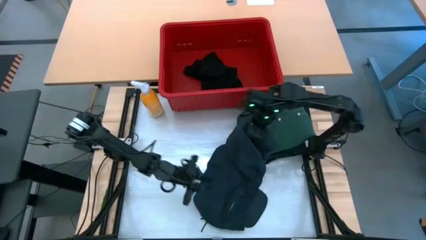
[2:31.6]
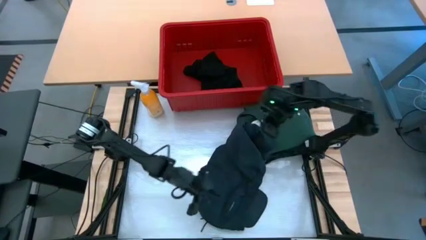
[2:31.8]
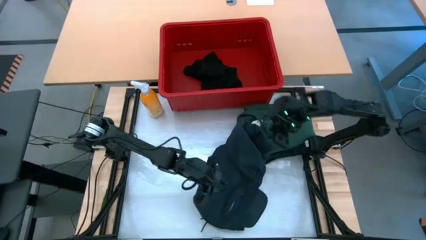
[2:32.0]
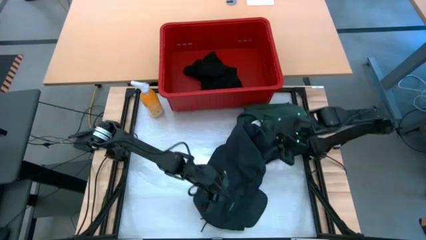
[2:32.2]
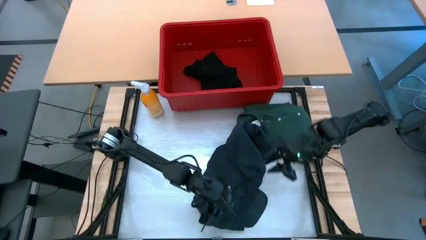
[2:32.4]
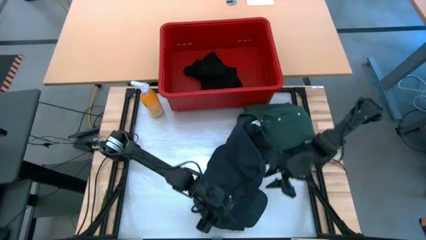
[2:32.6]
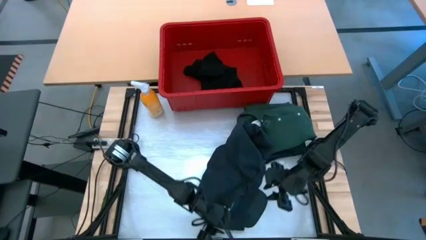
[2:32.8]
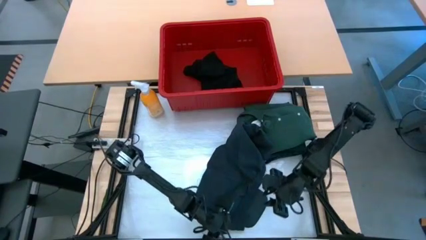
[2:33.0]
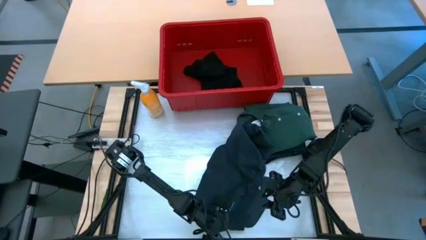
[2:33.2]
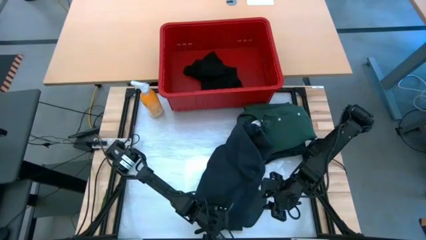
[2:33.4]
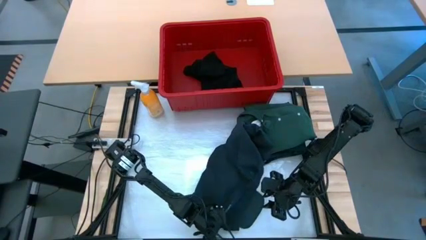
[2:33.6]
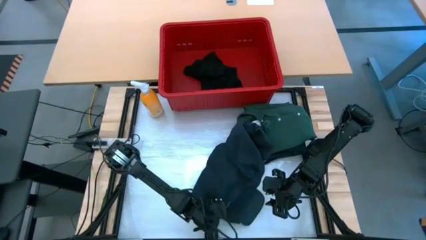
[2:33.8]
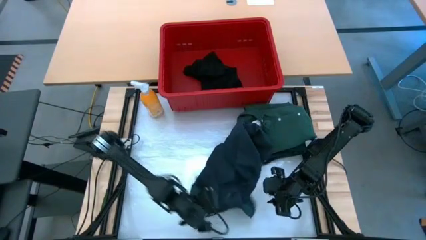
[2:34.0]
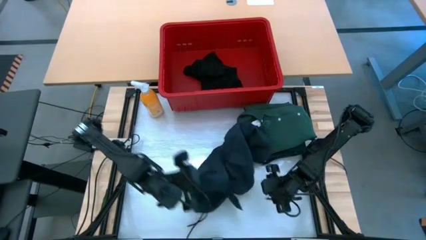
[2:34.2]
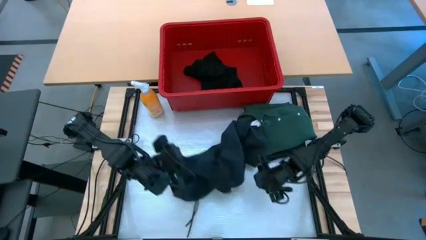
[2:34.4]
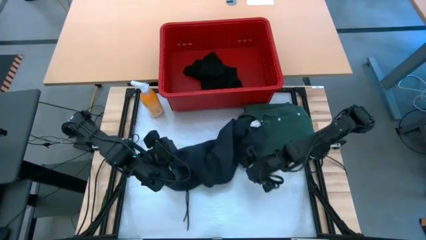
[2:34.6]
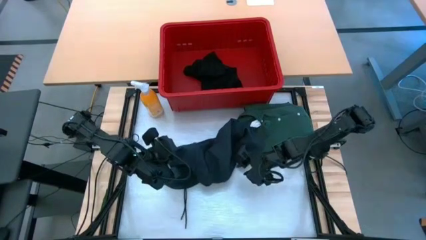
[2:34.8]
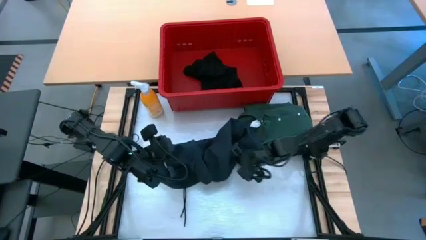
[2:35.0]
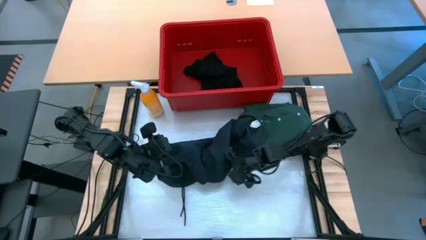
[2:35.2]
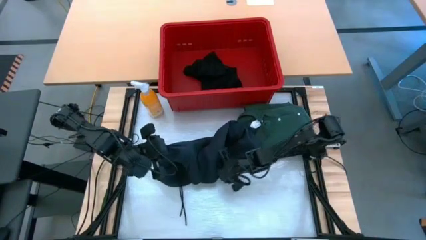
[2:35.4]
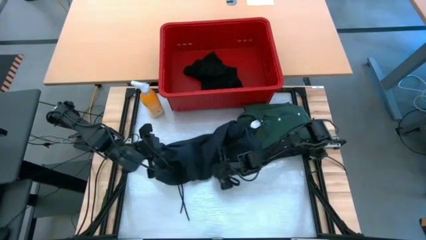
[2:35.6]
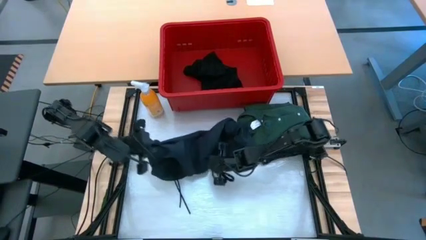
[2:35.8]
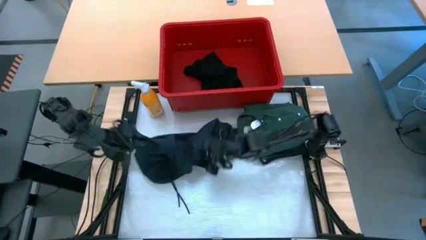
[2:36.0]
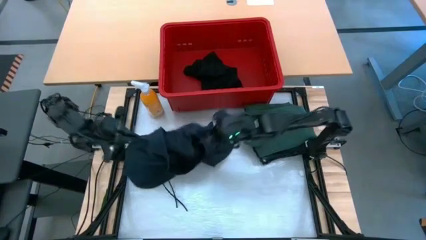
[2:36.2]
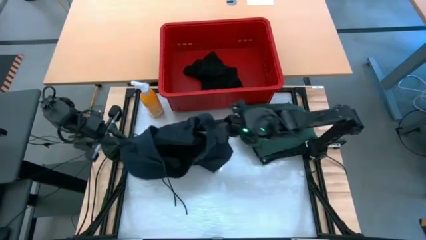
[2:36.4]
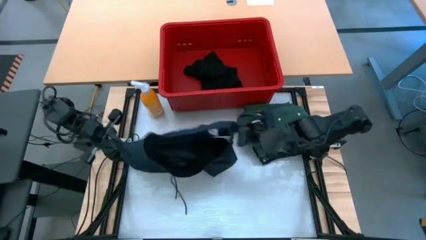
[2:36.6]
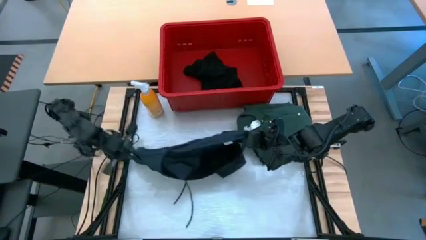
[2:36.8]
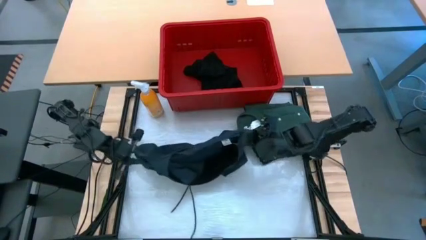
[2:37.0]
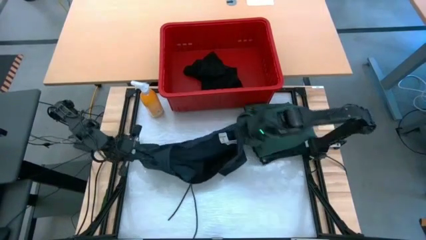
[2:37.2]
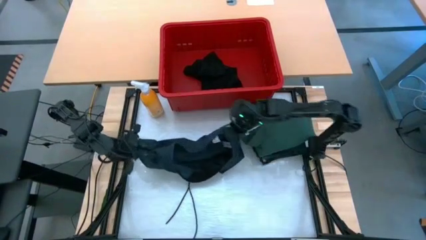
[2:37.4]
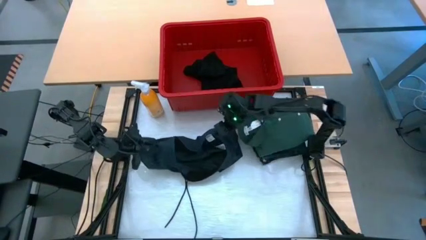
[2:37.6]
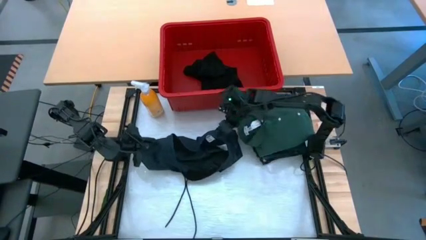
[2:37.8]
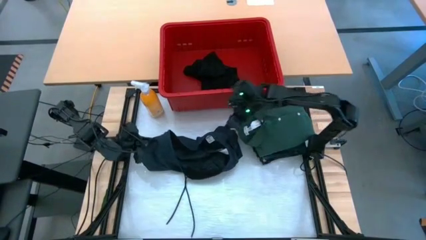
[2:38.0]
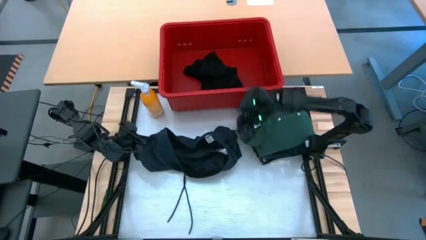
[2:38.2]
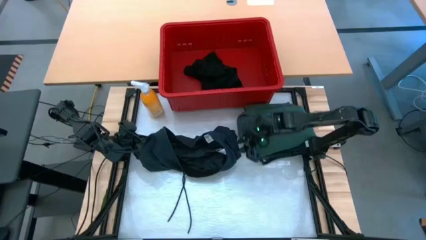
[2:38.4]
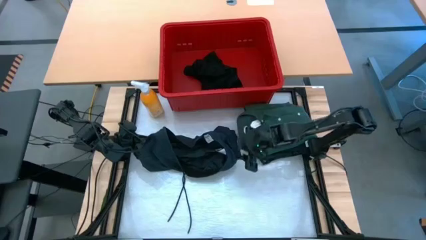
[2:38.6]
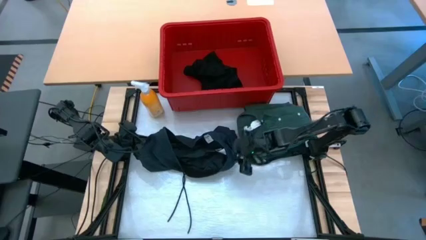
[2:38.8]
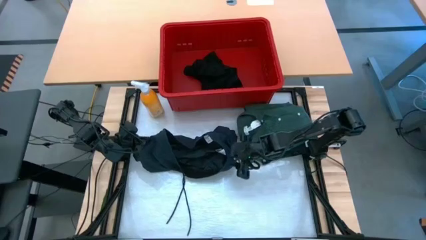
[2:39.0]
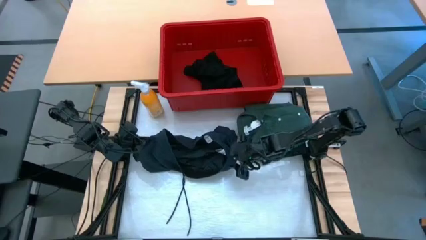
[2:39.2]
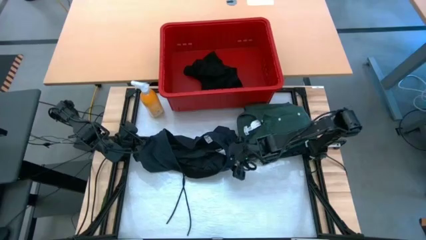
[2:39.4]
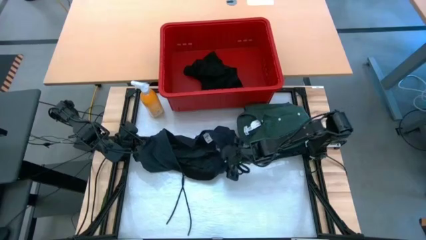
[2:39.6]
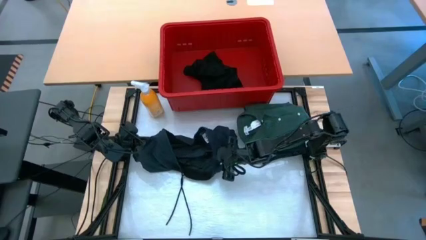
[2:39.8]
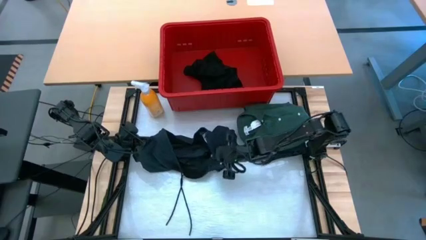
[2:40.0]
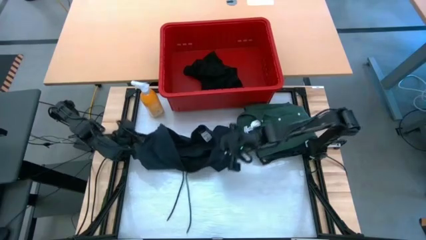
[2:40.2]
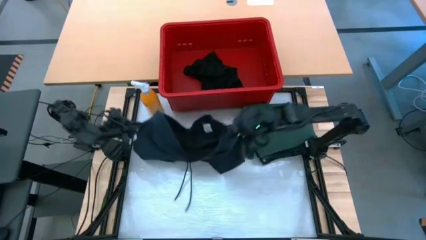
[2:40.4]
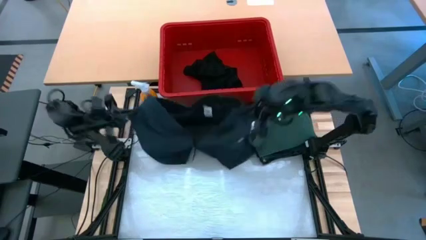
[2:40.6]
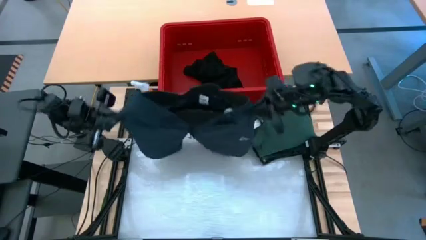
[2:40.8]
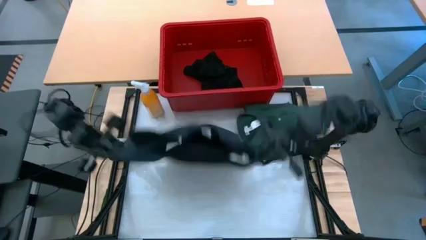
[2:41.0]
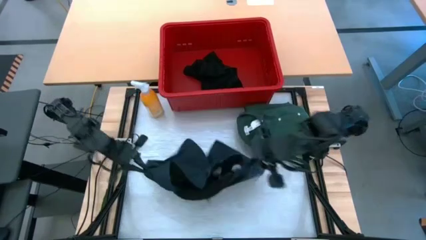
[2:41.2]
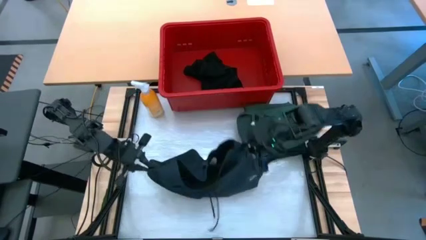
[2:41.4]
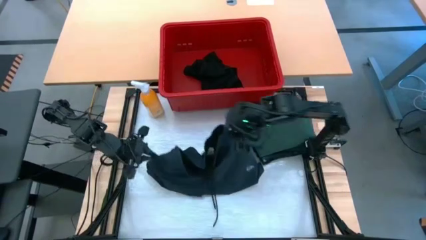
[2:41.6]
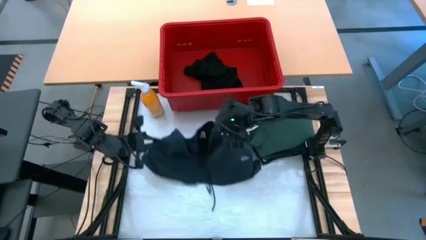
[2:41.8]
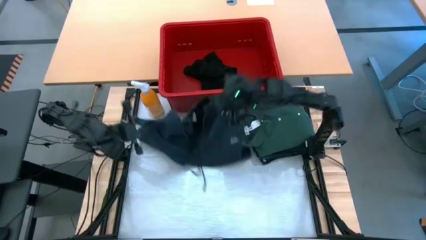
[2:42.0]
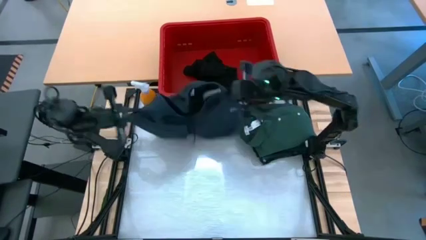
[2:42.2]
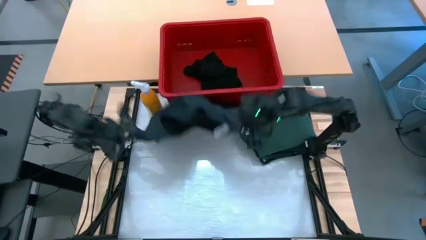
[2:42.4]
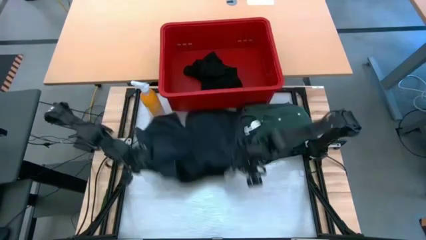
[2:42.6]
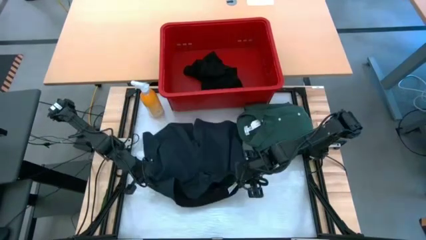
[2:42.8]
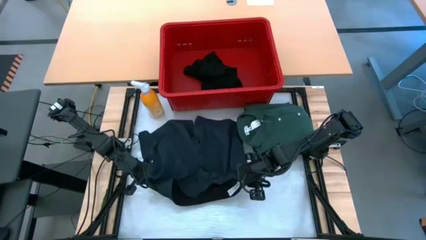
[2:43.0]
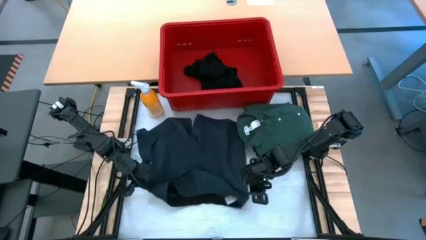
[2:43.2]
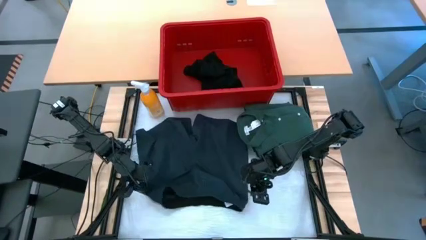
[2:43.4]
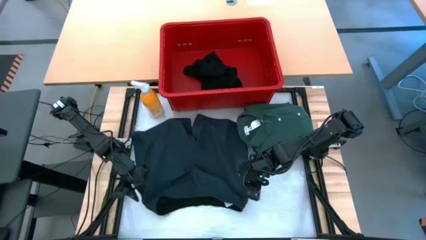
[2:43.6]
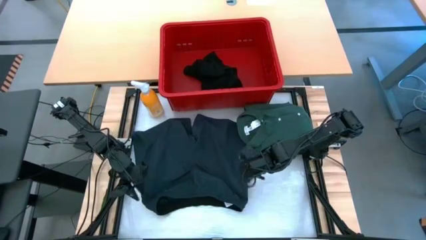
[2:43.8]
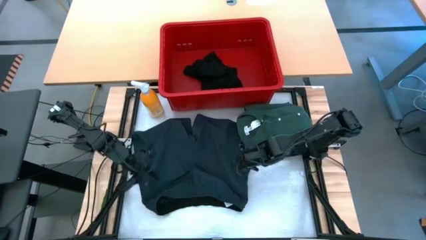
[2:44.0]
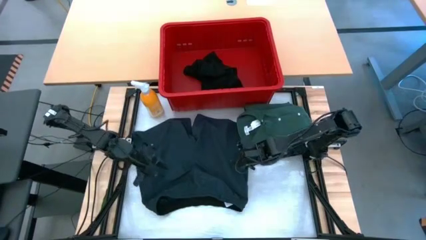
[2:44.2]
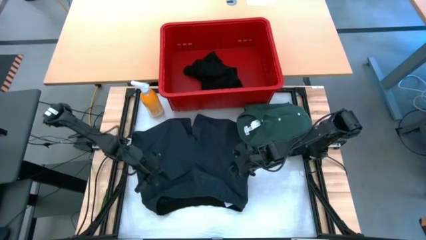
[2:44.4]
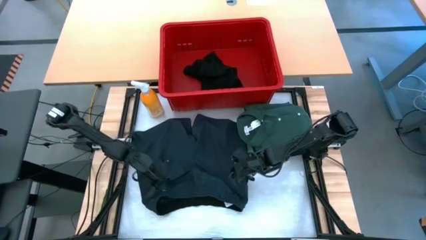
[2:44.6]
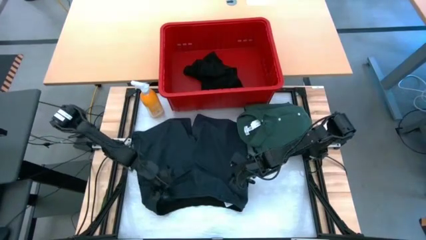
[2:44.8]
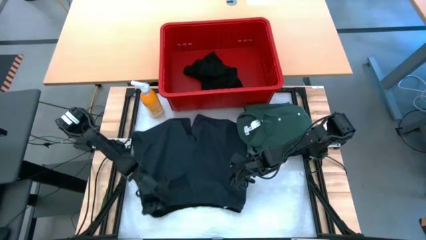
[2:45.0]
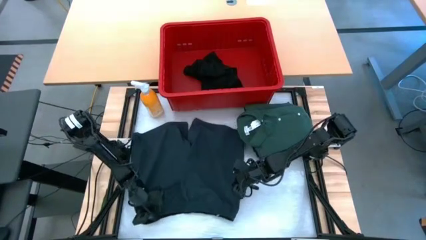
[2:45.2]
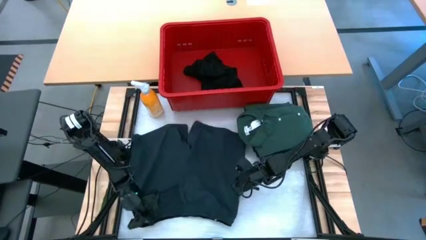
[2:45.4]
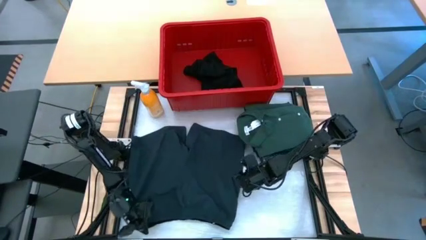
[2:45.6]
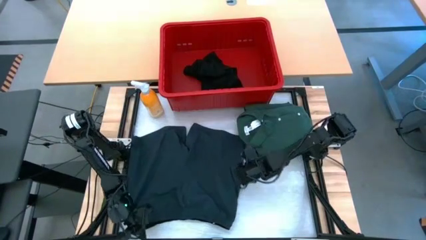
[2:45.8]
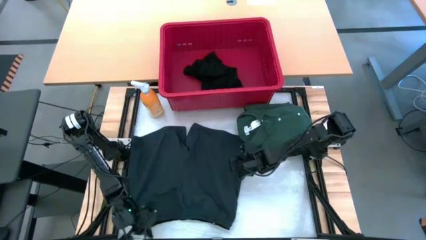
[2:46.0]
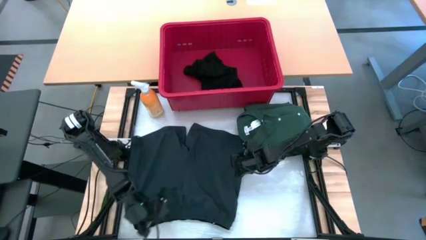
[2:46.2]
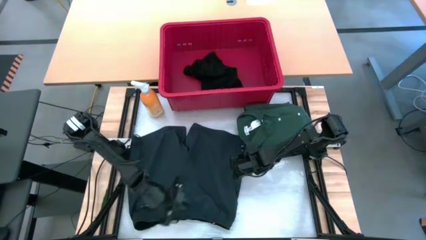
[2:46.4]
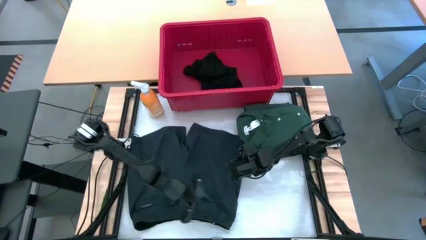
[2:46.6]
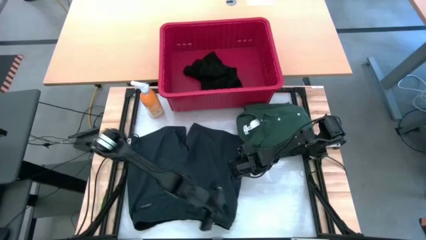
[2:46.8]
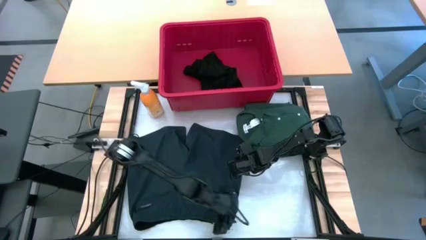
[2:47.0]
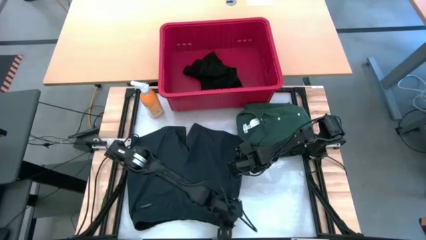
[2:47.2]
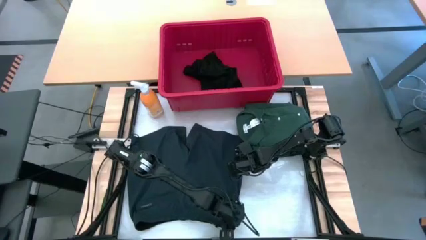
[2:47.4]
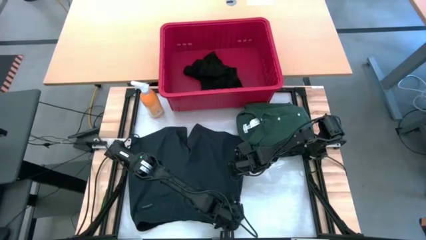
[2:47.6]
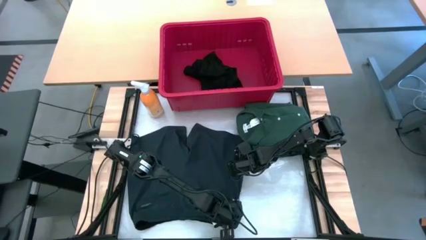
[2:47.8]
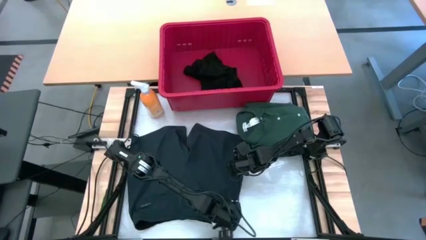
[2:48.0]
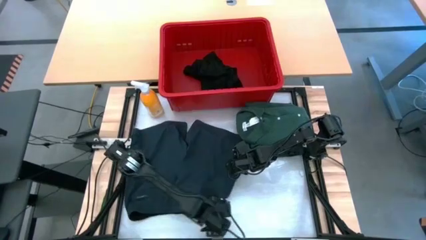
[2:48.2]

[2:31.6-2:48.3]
Task: Fold Laundry from Bin
Fold the dark blue shorts
